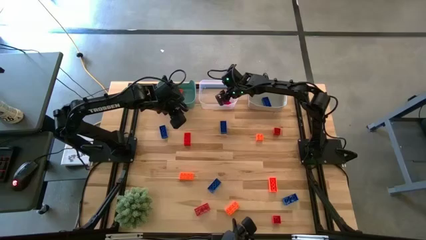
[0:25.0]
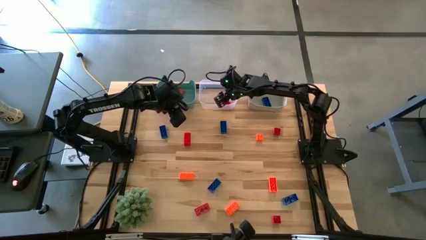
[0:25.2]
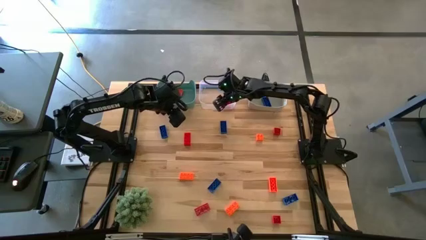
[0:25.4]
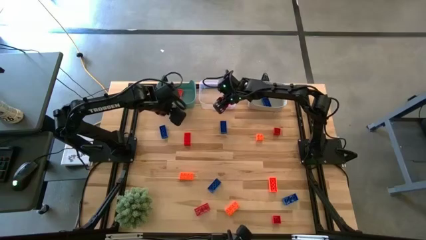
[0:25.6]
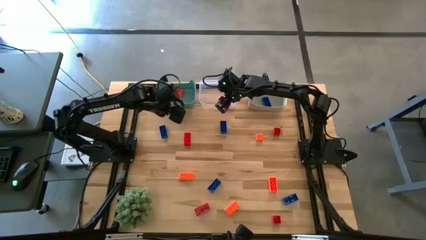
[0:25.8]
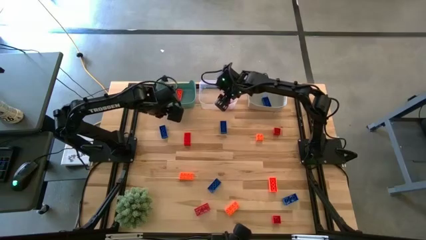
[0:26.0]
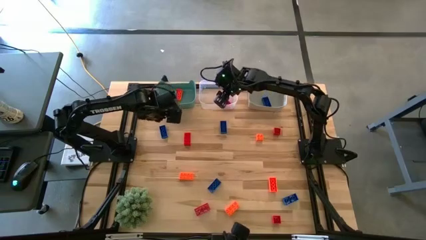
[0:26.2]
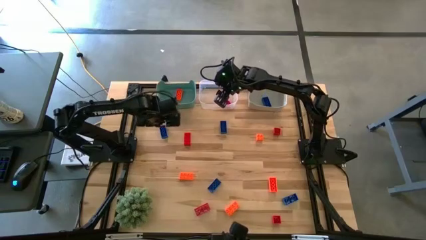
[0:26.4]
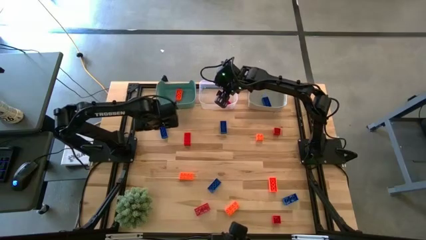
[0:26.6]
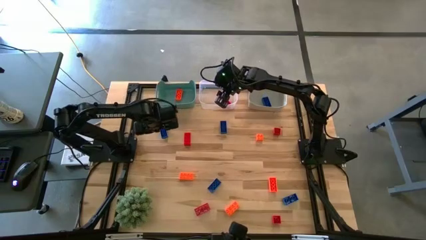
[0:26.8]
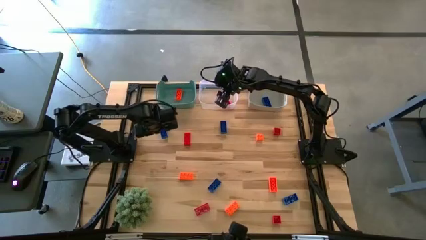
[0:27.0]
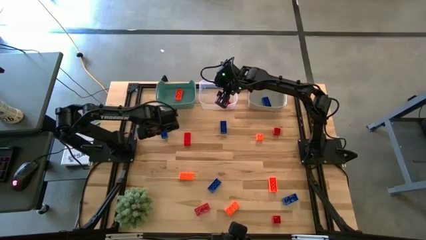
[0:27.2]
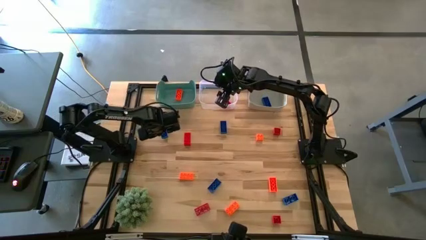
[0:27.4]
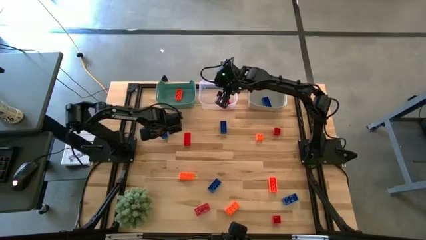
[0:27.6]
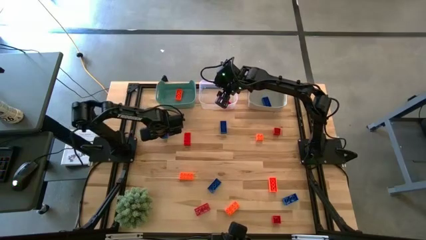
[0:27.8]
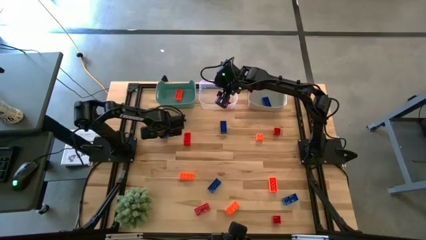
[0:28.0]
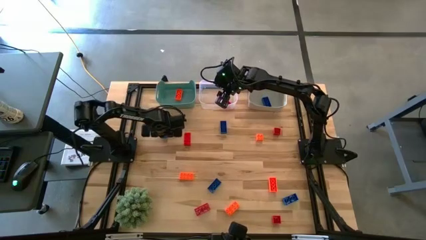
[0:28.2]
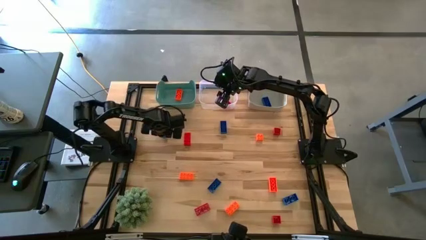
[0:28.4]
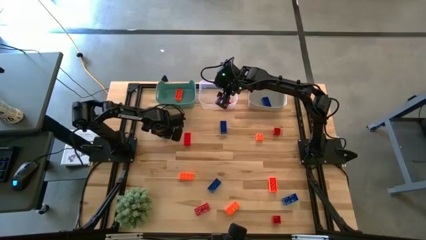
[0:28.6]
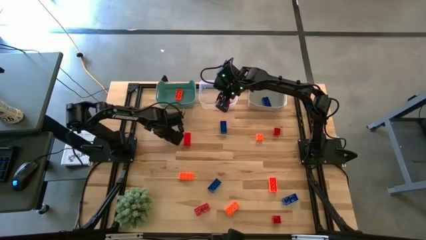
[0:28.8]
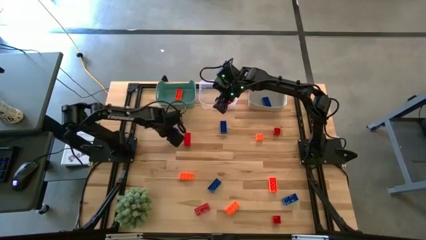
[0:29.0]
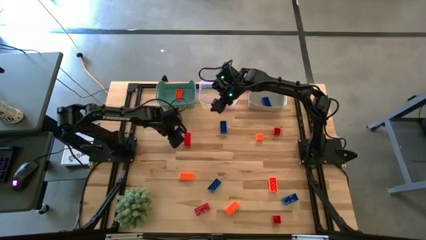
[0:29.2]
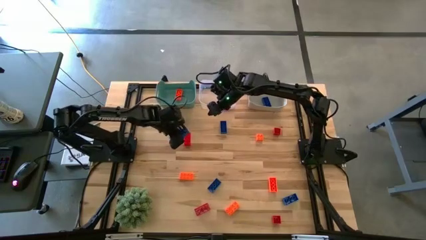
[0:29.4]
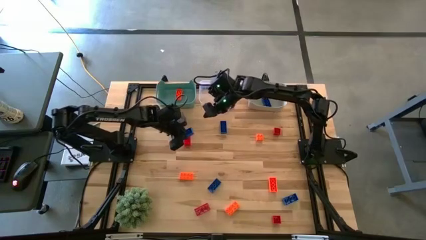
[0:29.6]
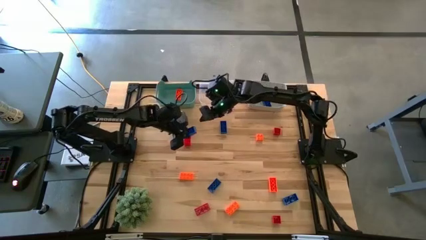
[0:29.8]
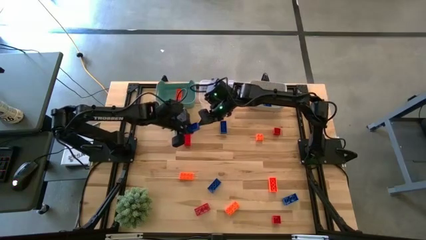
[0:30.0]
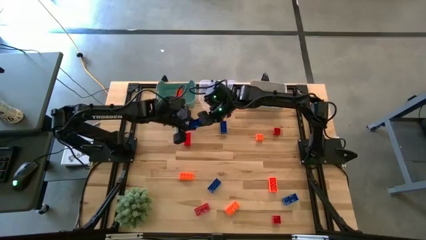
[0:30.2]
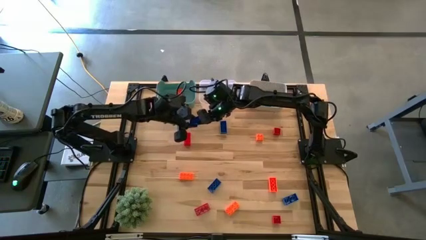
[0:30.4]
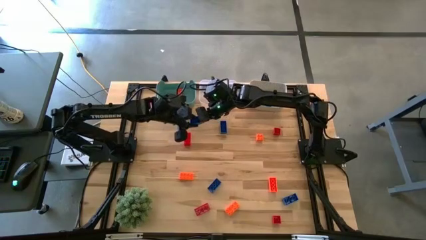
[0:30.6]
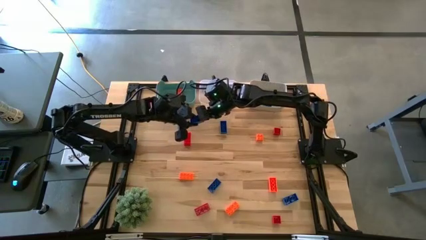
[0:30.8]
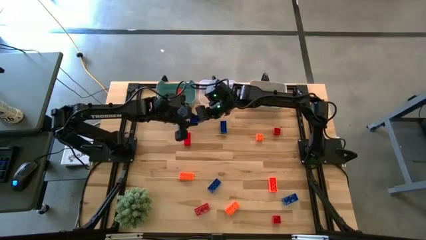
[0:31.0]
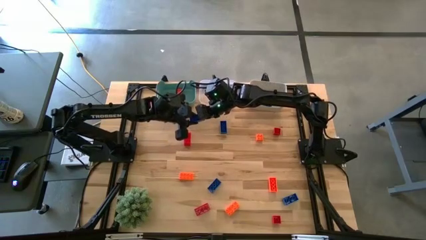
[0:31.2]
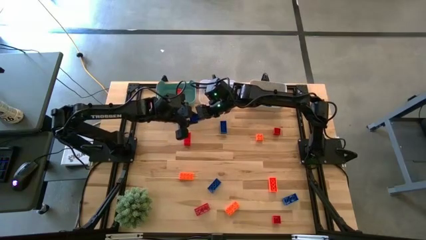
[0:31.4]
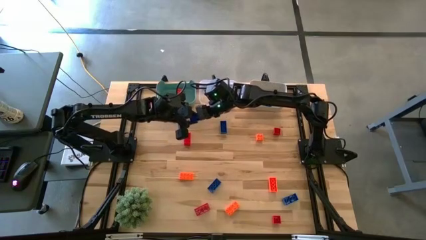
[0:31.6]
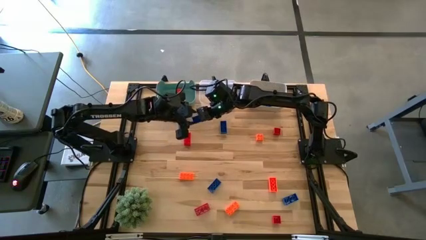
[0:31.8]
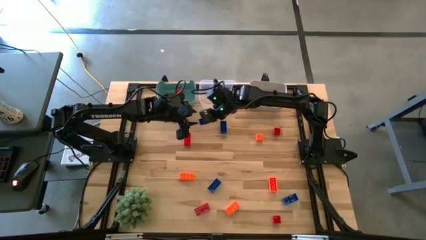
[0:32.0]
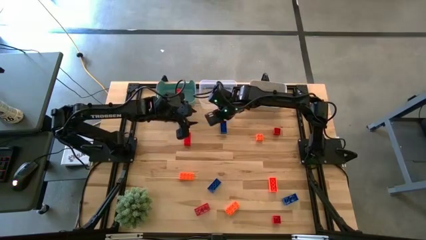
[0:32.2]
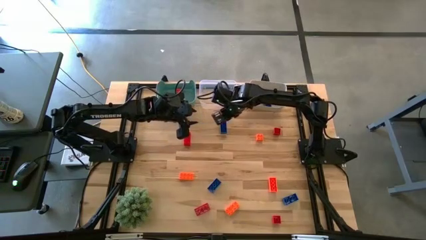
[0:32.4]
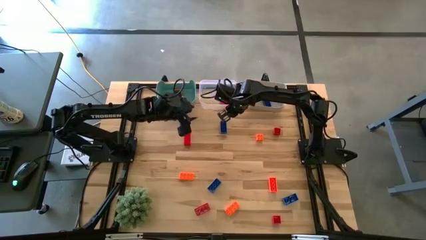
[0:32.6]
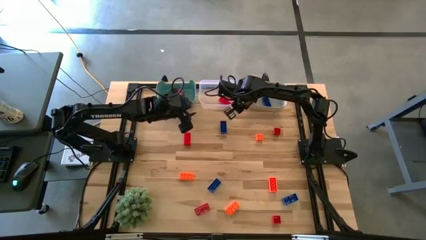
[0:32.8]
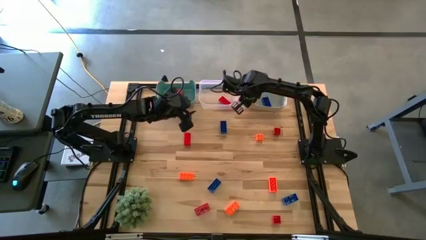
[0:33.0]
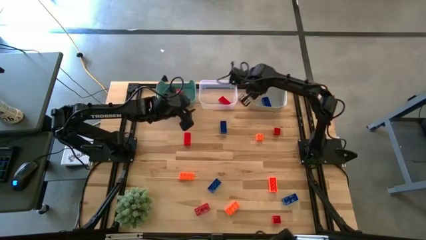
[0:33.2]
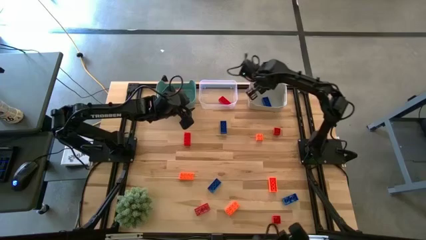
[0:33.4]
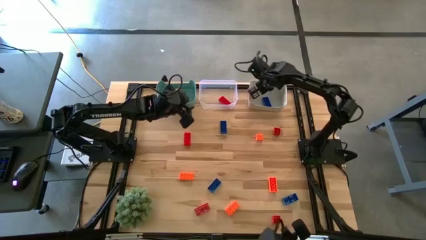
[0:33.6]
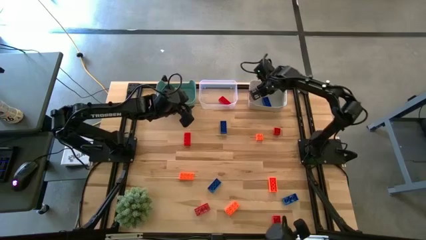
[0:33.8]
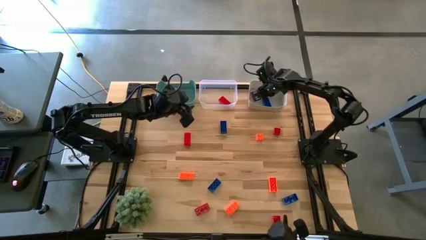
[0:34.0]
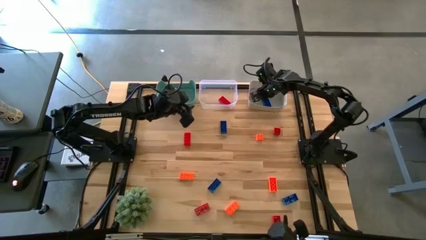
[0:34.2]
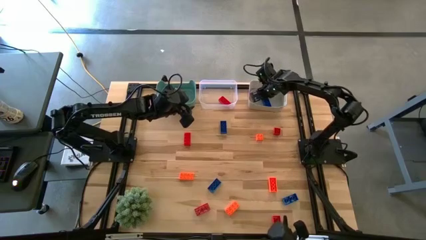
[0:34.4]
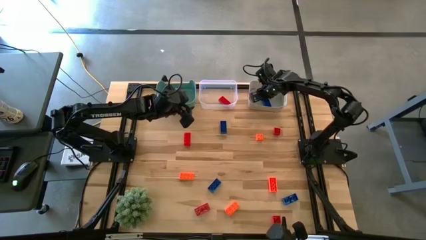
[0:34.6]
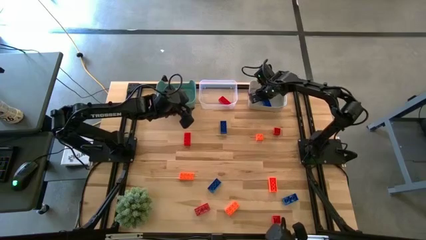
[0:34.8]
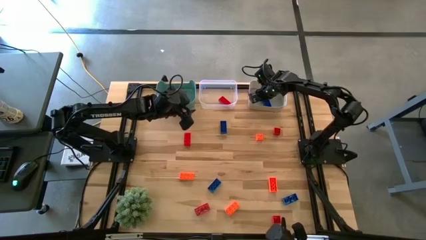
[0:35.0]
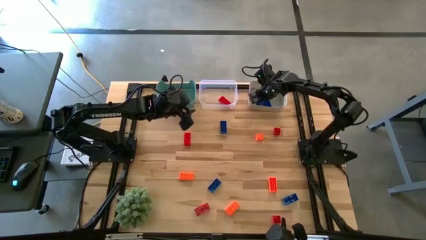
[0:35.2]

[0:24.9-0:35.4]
Task: Sort & place blocks by color
Put the blue game piece into the gray bin

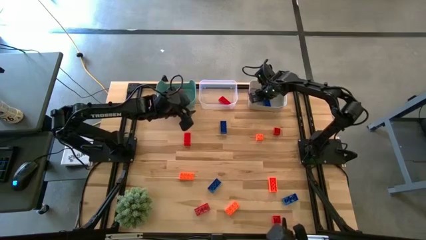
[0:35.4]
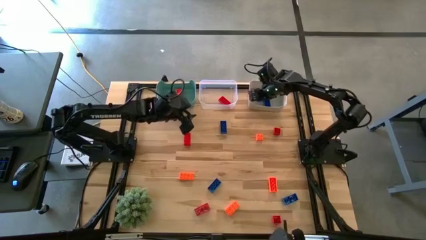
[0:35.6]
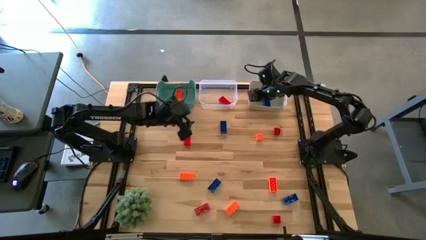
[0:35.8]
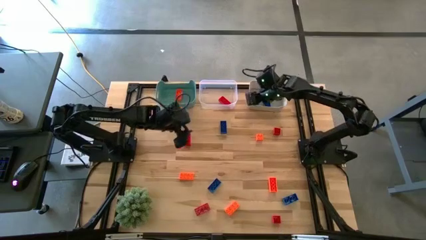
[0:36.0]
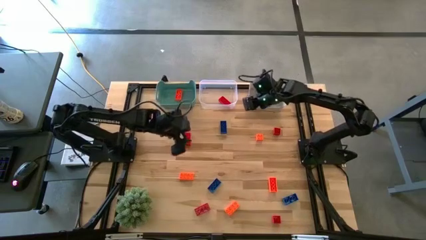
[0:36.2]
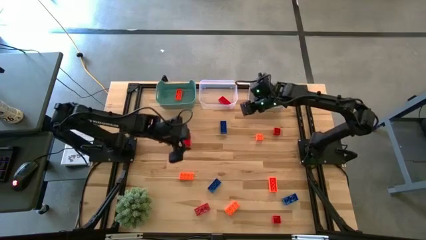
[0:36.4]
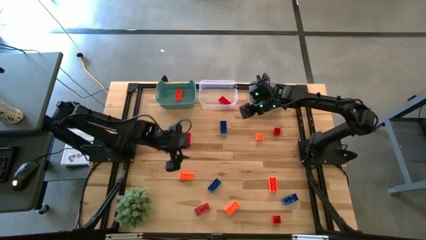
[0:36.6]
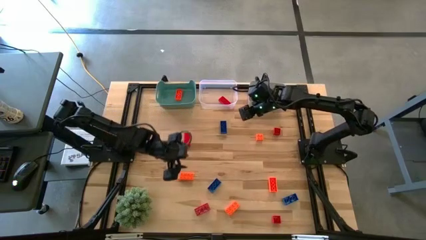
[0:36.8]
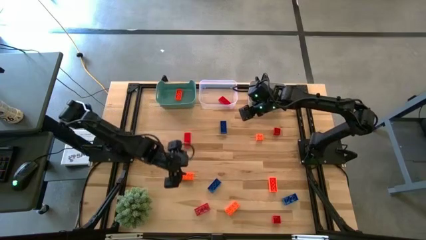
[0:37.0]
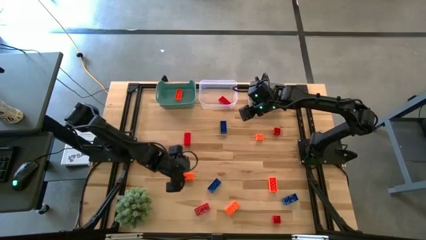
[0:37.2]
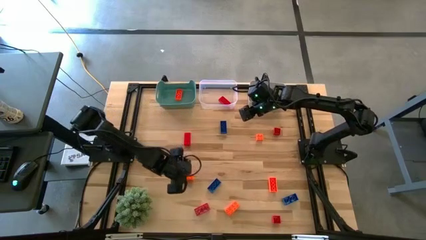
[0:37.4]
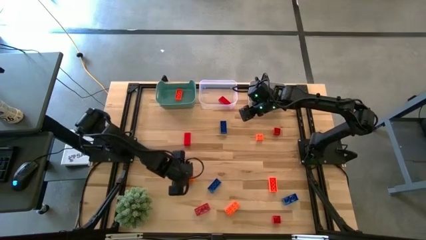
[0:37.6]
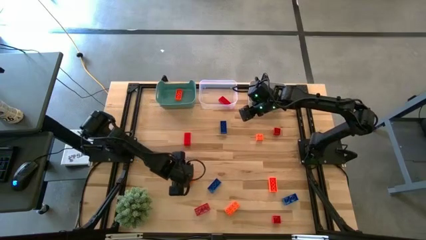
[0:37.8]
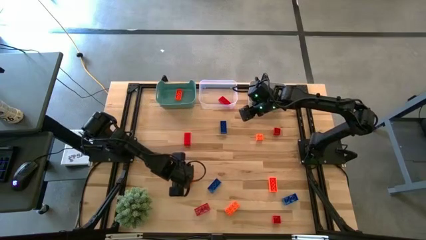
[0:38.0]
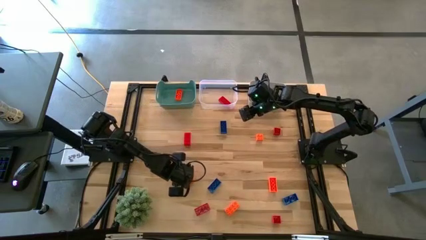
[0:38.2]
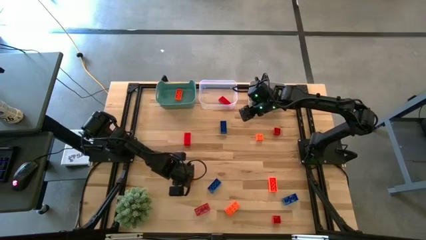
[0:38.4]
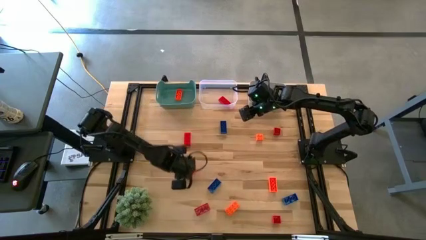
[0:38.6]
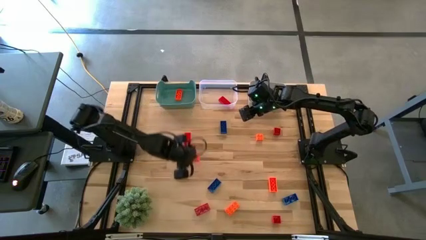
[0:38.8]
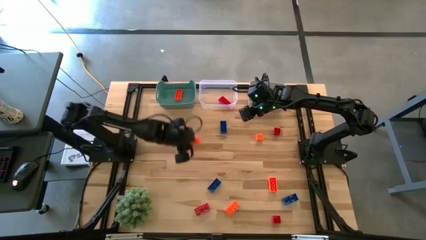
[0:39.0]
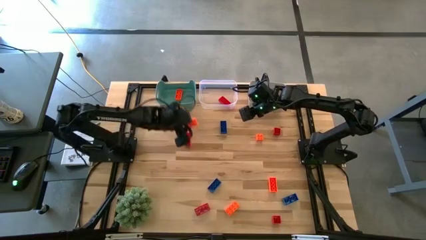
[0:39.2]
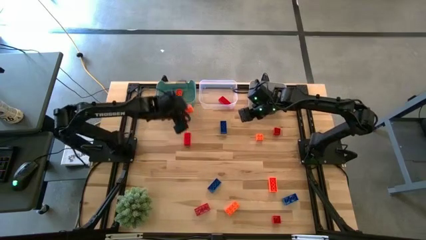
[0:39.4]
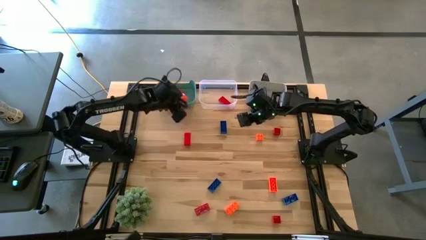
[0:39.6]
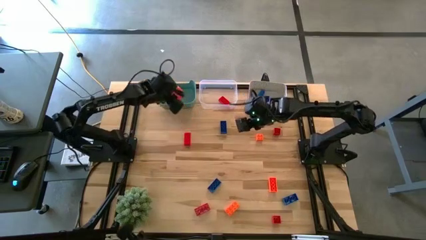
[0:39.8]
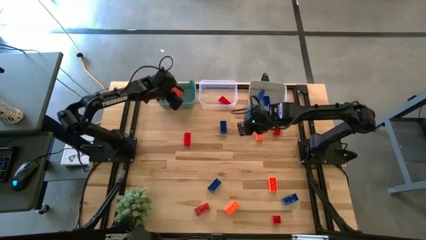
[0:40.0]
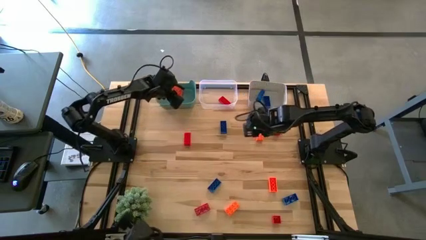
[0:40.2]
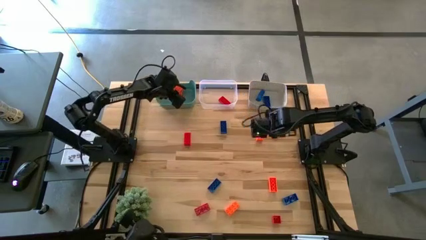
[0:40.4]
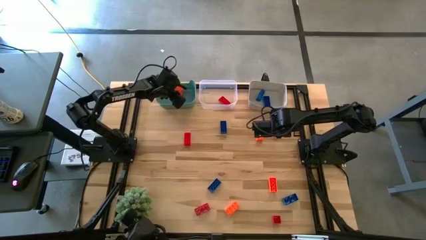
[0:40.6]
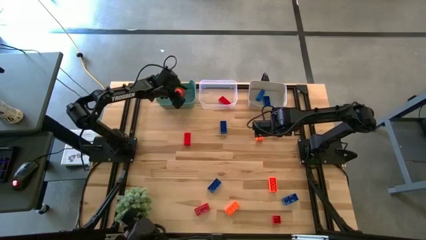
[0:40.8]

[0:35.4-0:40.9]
Put the orange game piece into the green bin
